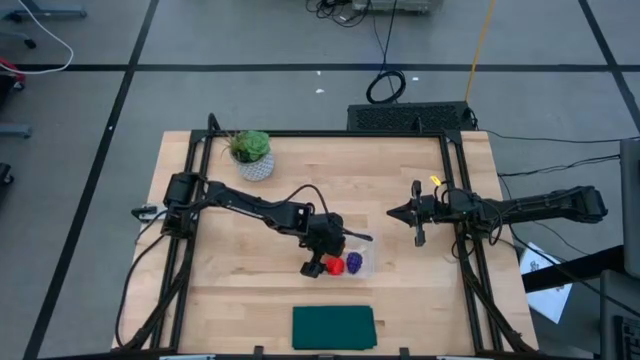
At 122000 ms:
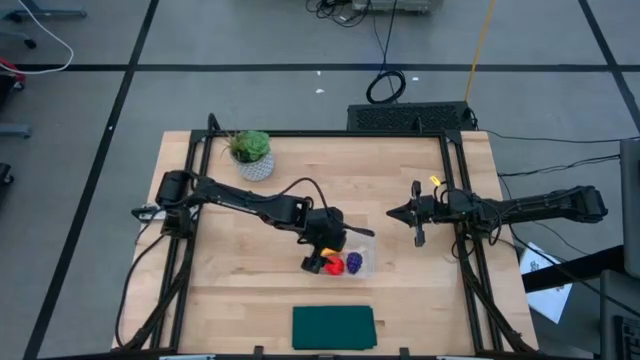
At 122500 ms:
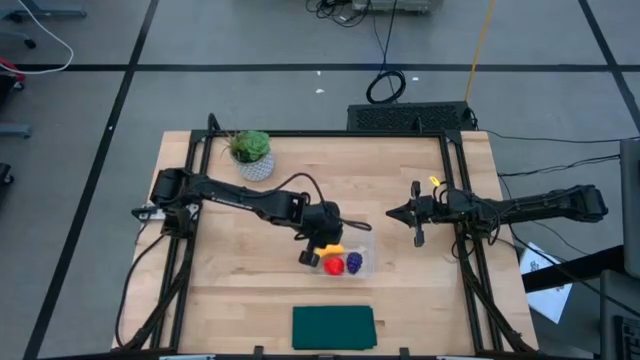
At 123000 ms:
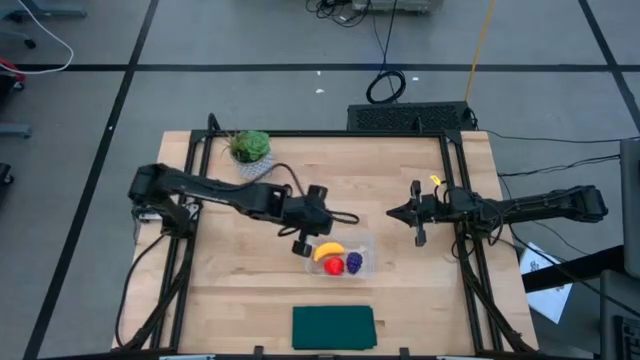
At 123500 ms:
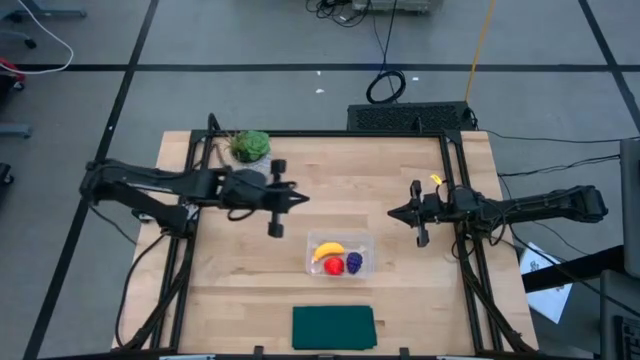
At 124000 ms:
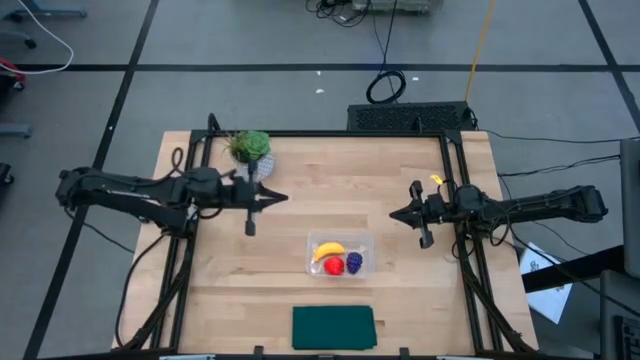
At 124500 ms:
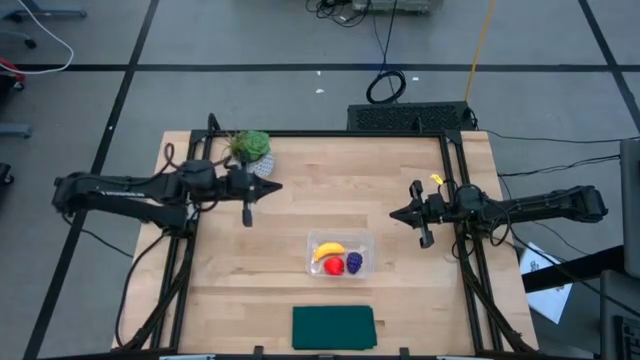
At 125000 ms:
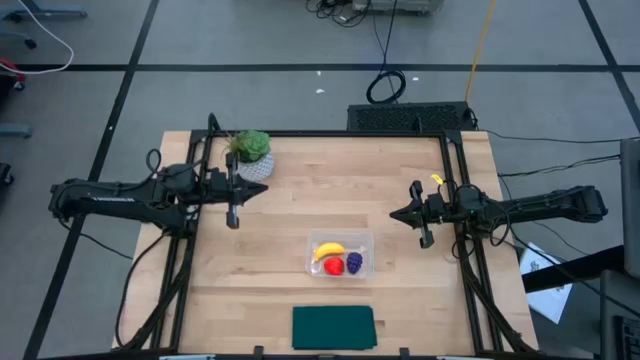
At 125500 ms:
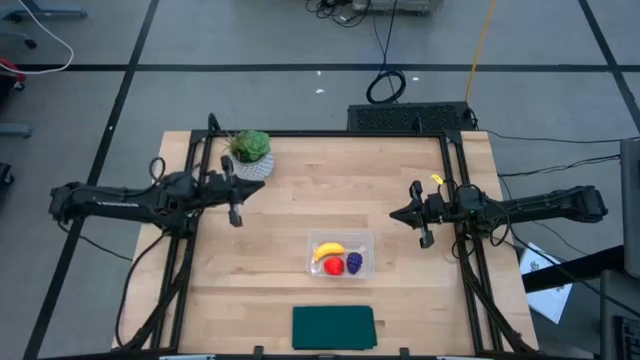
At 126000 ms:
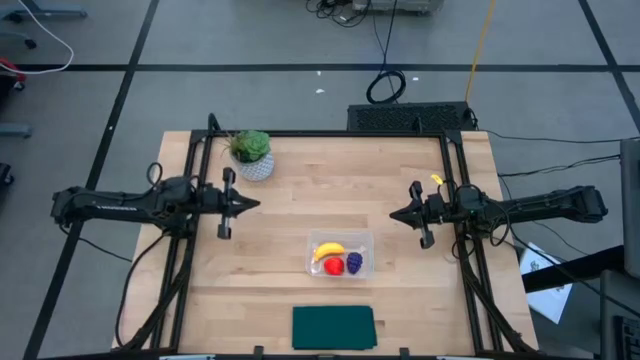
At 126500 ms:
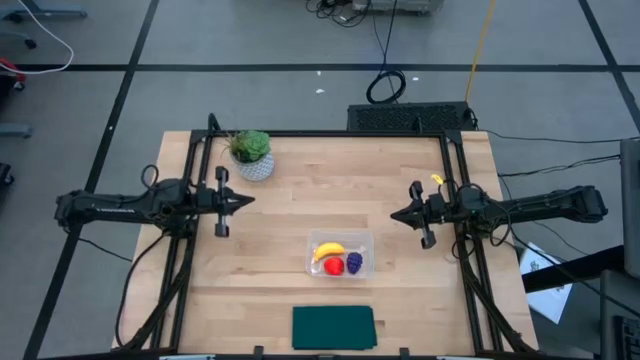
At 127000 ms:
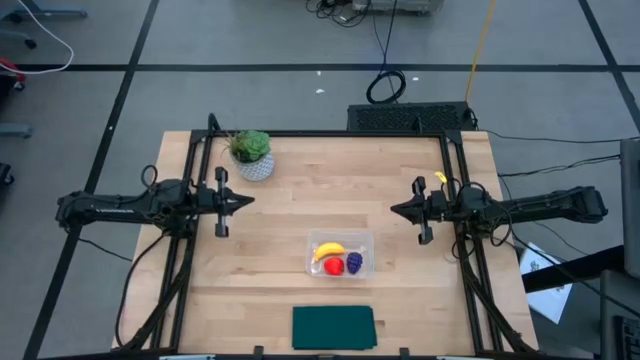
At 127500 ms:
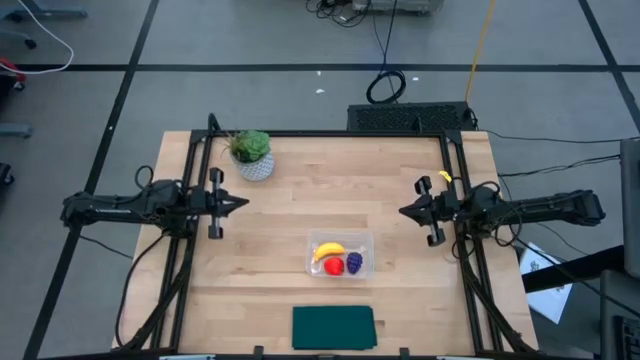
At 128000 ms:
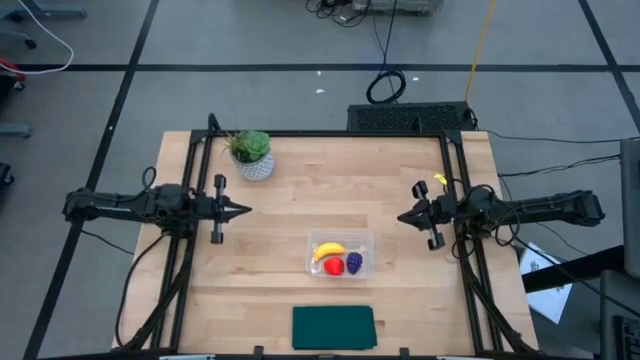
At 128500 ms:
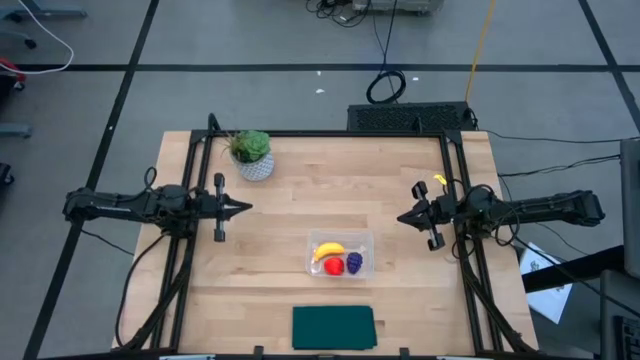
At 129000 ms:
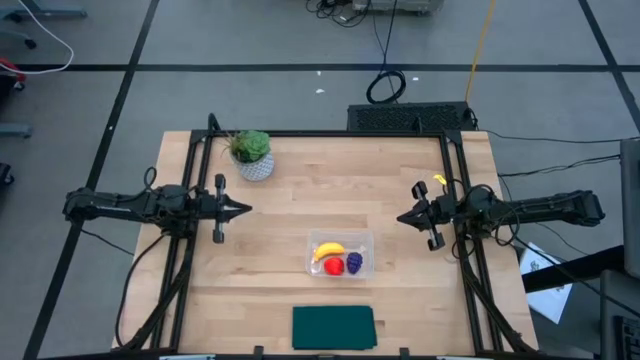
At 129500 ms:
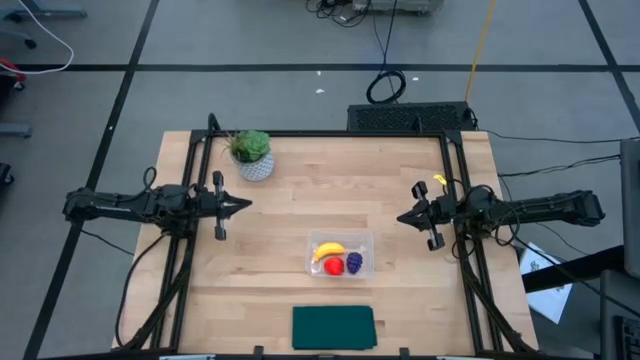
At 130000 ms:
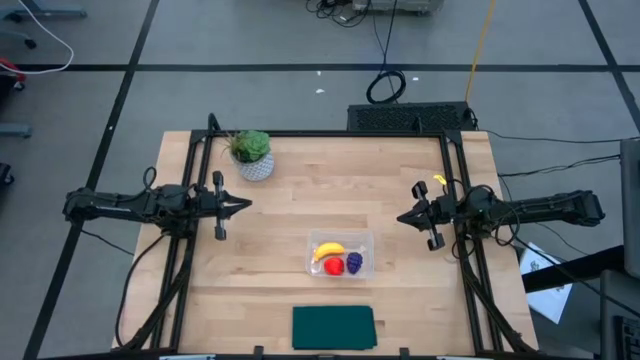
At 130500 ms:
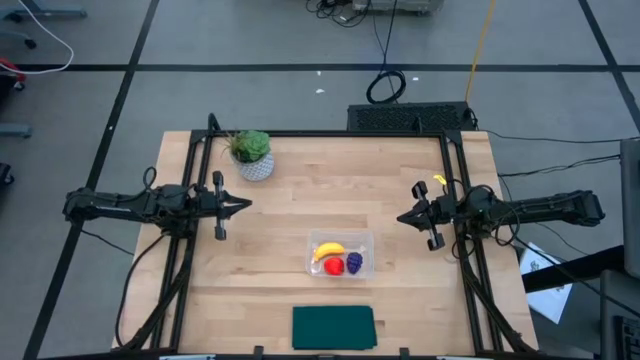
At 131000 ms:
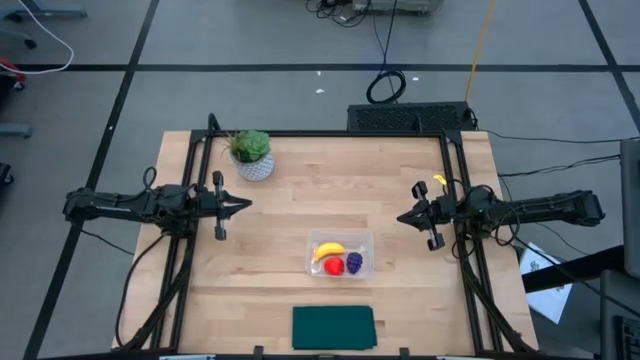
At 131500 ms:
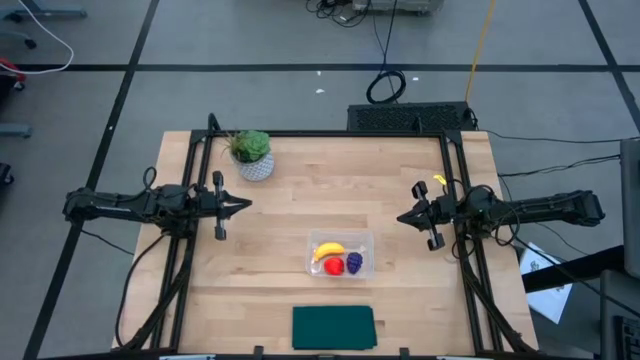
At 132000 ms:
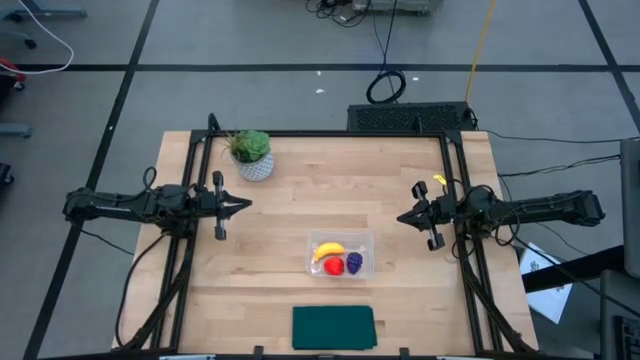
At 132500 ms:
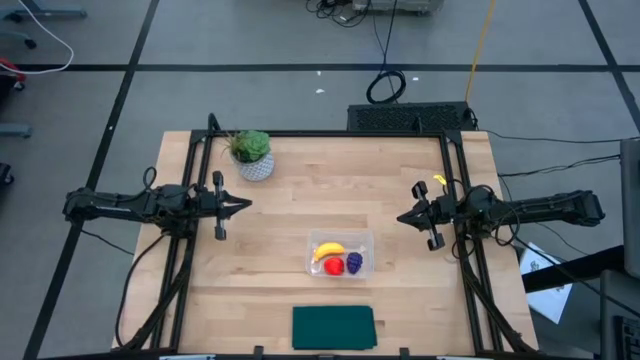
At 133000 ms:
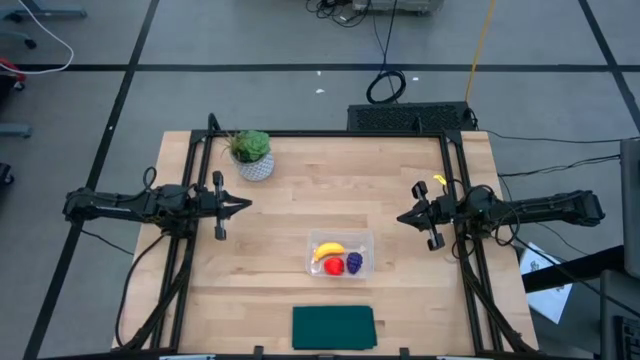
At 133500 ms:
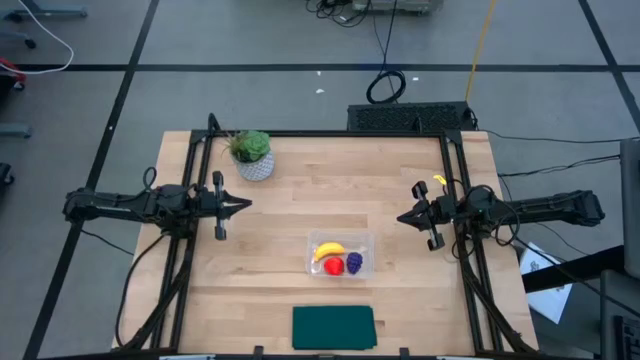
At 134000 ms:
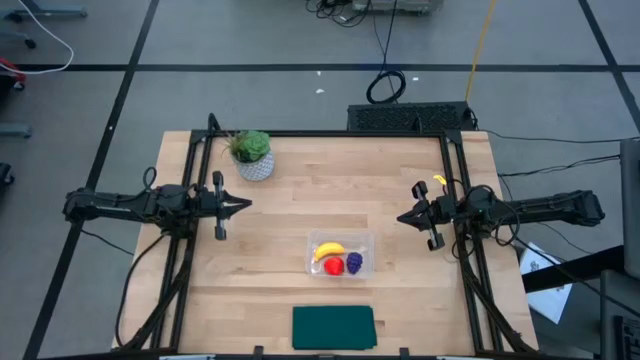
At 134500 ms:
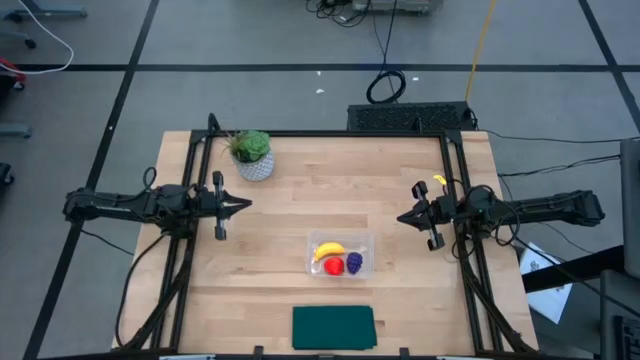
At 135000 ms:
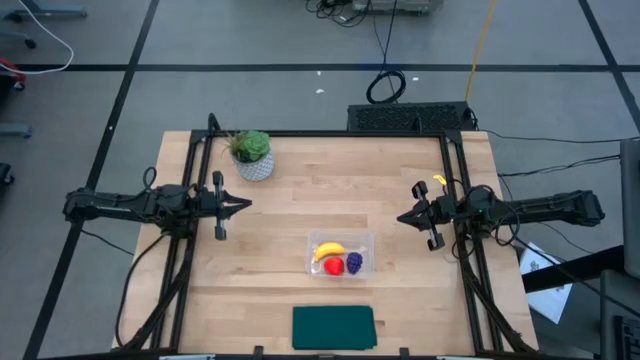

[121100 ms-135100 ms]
Task: Pick and placing Produce into tupperware
Return to Home Position

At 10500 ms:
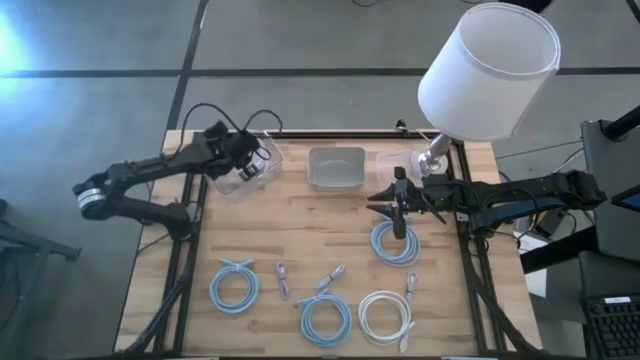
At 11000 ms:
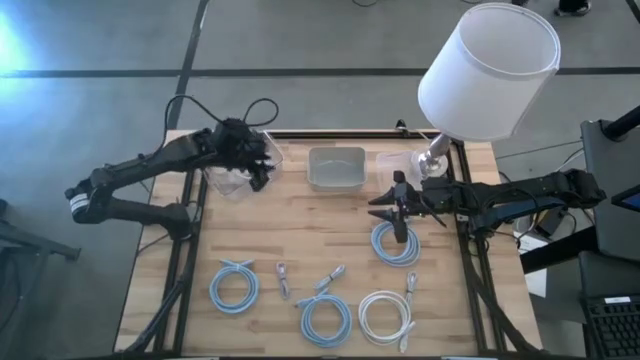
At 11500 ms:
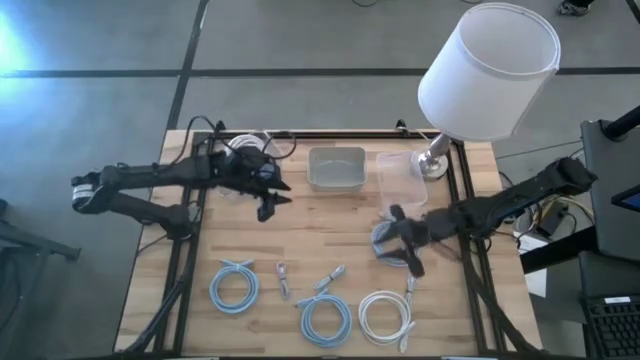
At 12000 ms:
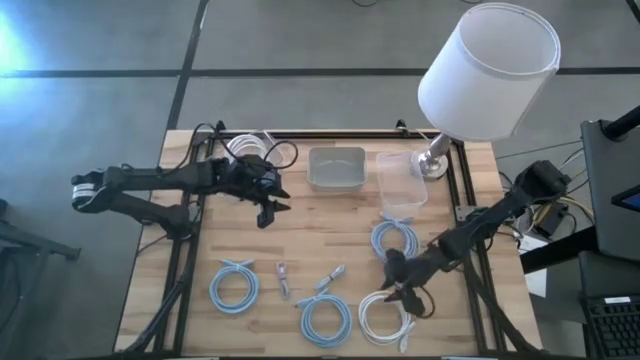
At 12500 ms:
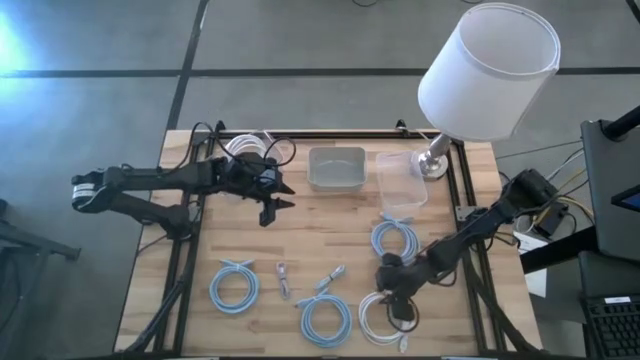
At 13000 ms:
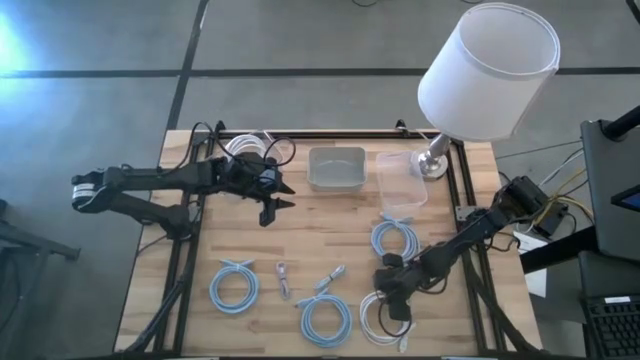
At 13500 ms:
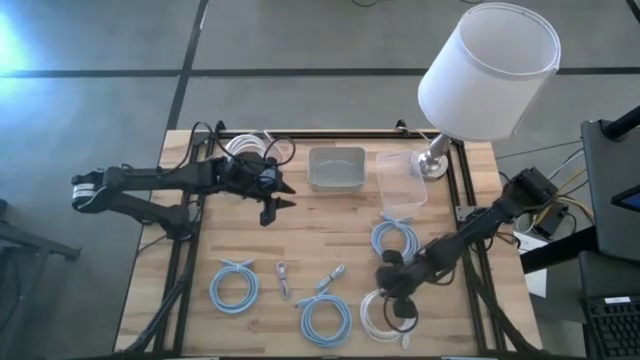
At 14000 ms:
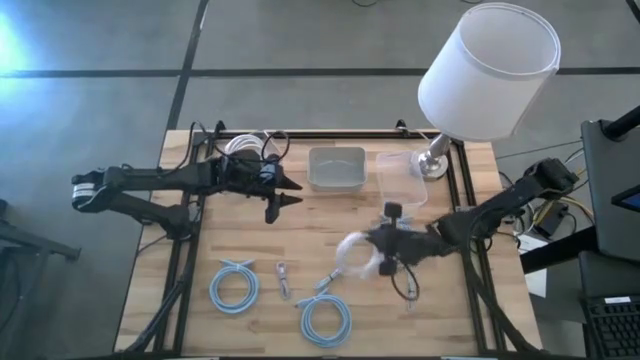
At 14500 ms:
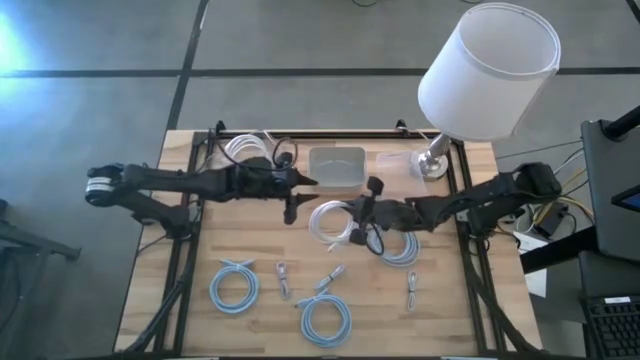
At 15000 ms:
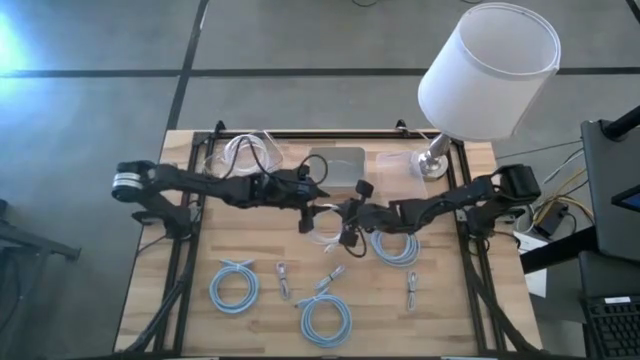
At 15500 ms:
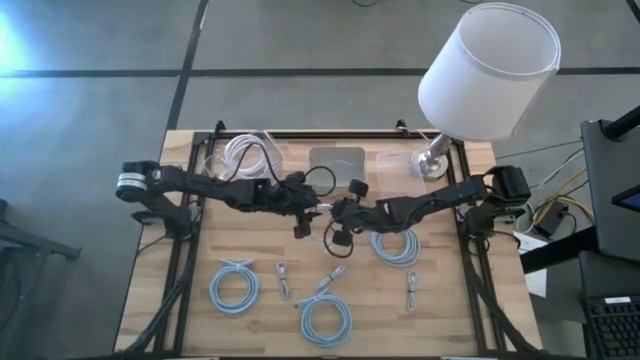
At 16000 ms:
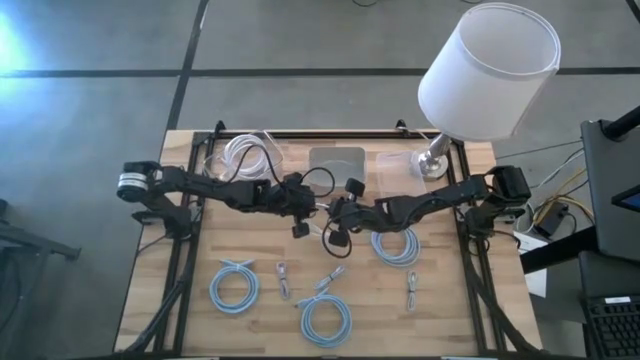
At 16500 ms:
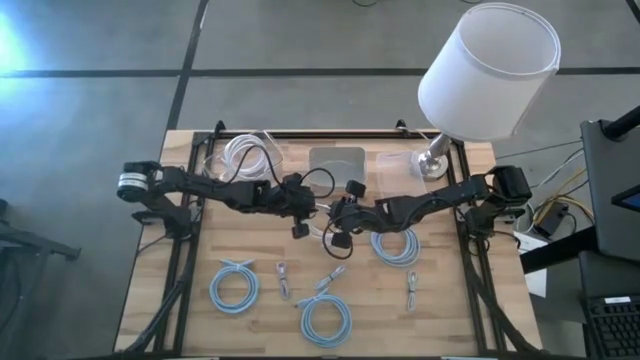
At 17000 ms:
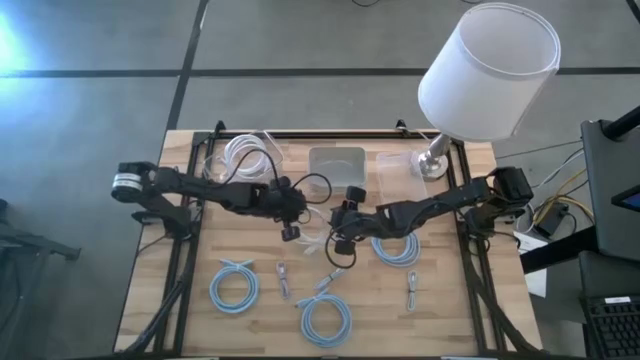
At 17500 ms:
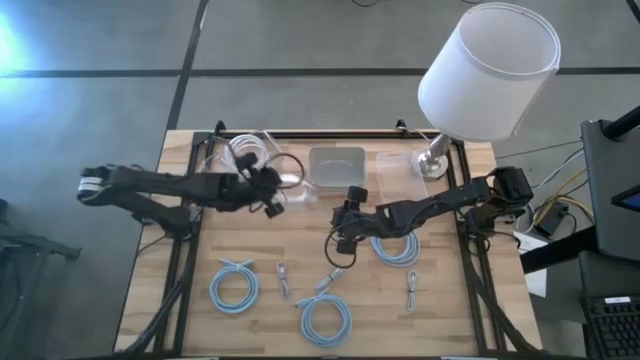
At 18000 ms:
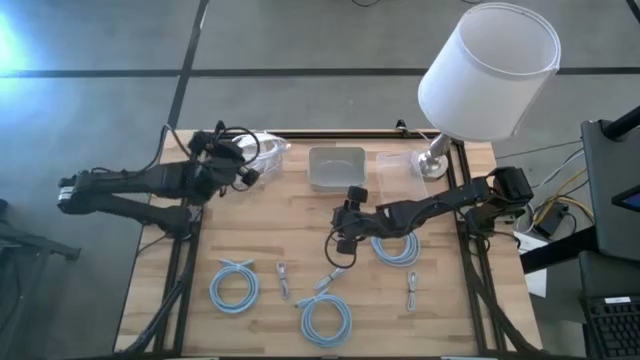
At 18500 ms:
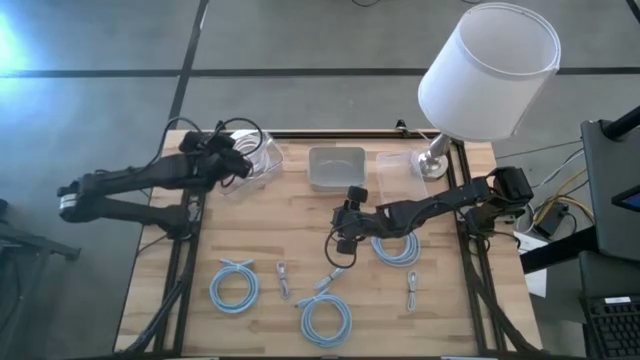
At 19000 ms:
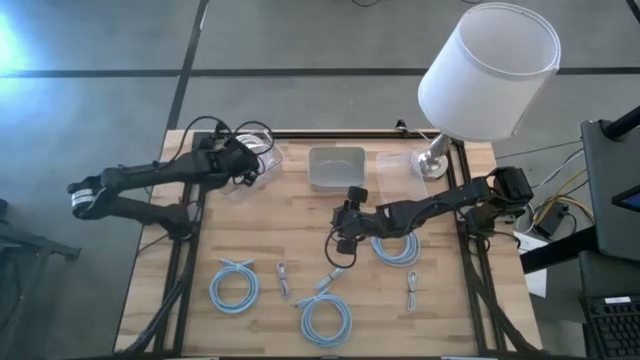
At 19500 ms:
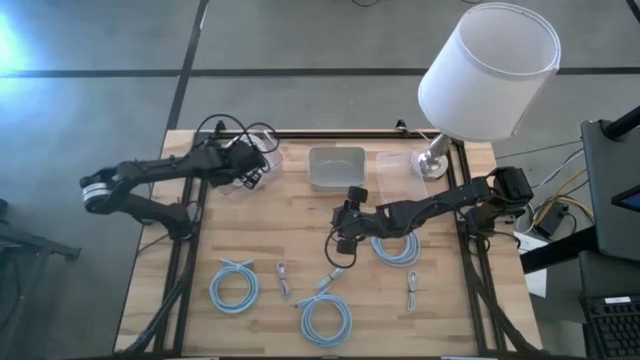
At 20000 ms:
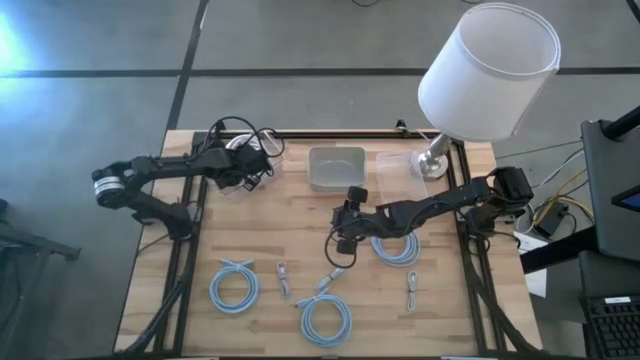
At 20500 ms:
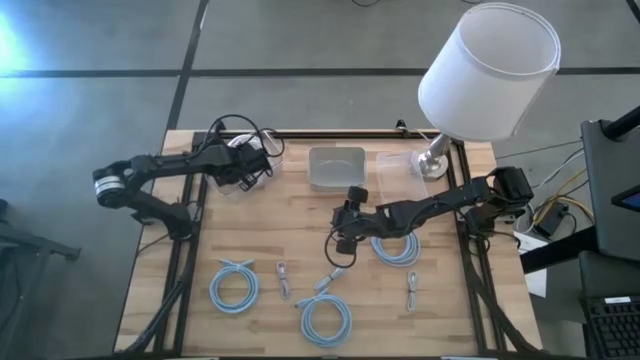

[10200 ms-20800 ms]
Task: Pick & Place USB Port
Put the large white charger cable into the left transparent bin
